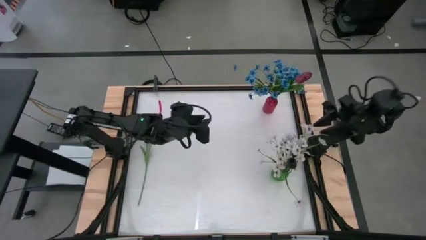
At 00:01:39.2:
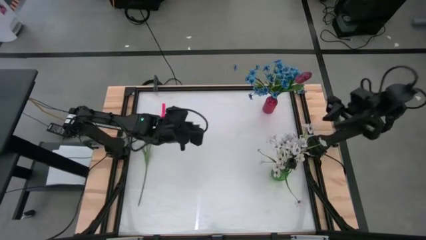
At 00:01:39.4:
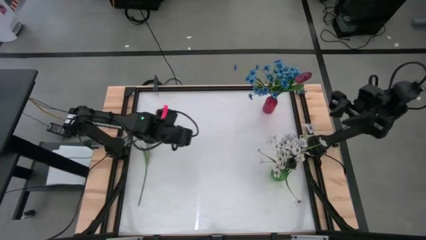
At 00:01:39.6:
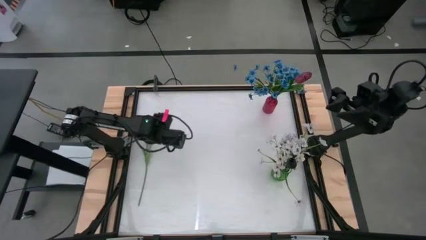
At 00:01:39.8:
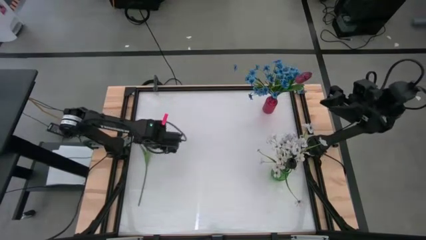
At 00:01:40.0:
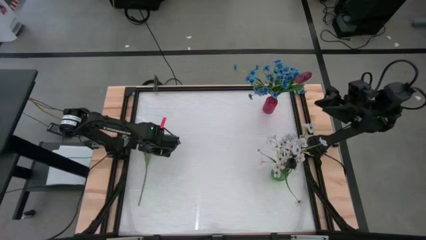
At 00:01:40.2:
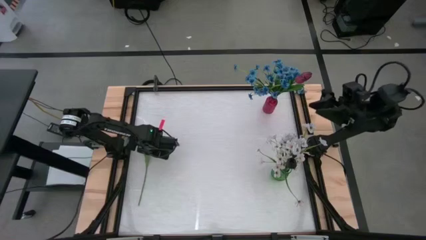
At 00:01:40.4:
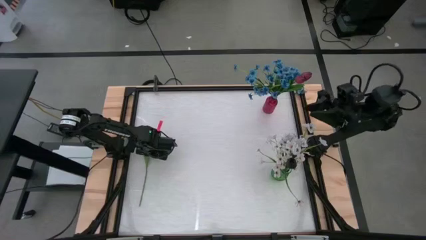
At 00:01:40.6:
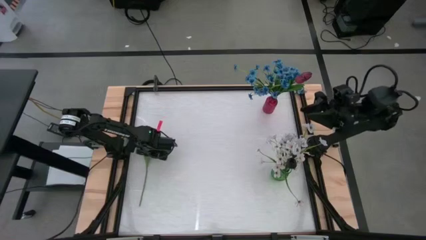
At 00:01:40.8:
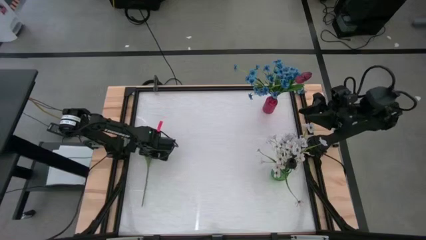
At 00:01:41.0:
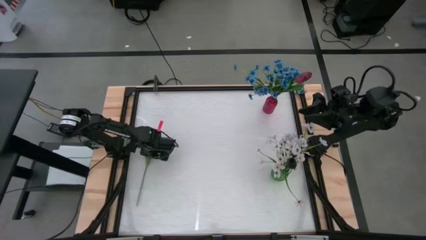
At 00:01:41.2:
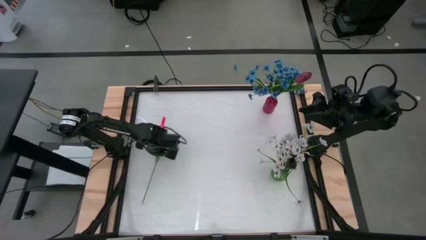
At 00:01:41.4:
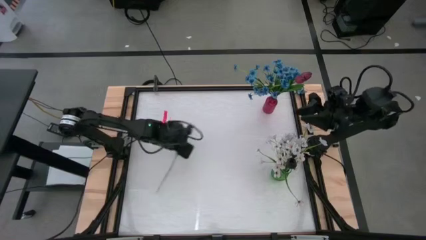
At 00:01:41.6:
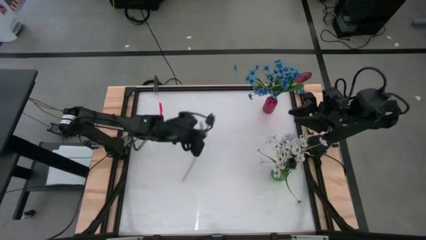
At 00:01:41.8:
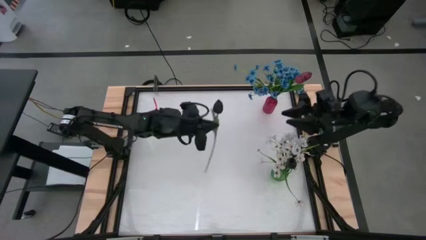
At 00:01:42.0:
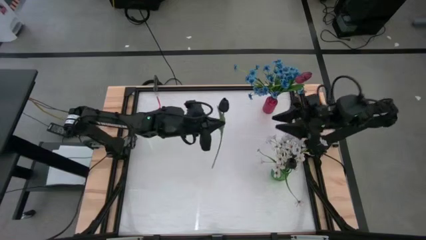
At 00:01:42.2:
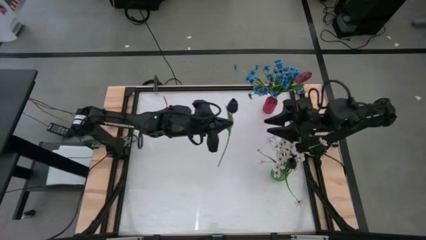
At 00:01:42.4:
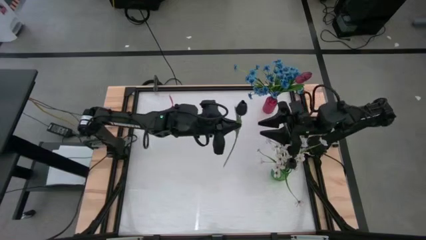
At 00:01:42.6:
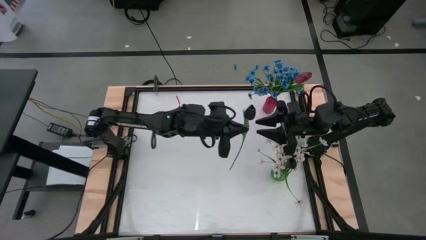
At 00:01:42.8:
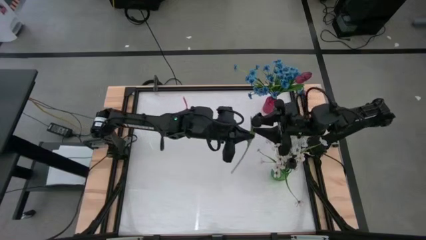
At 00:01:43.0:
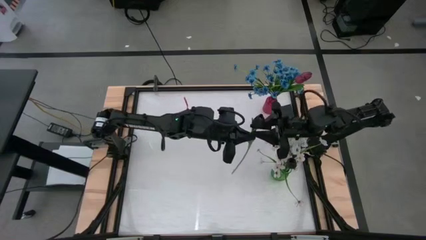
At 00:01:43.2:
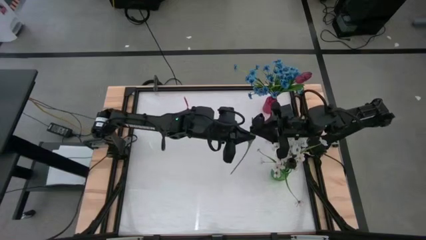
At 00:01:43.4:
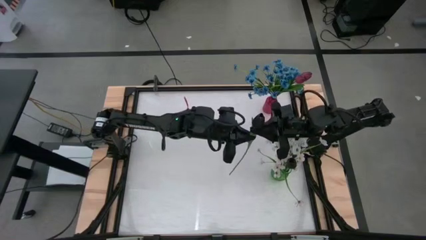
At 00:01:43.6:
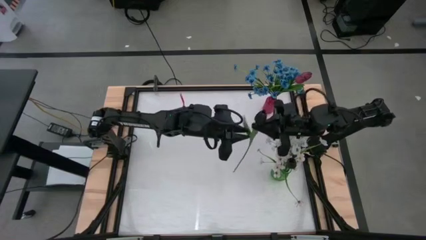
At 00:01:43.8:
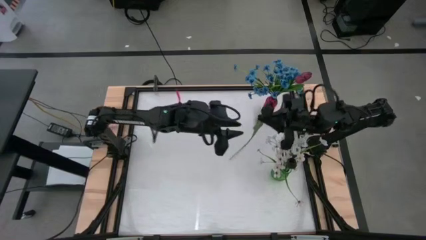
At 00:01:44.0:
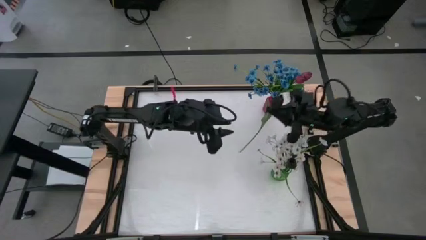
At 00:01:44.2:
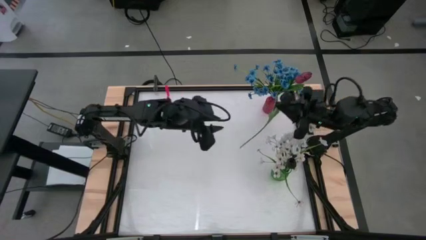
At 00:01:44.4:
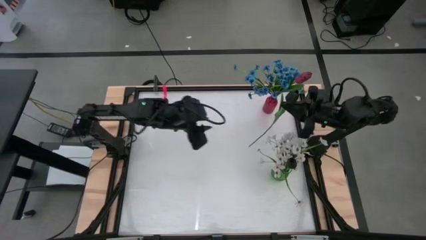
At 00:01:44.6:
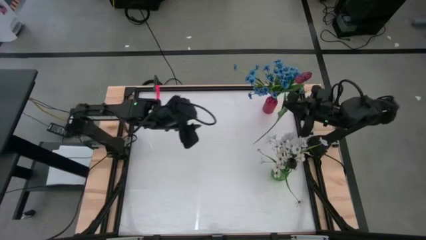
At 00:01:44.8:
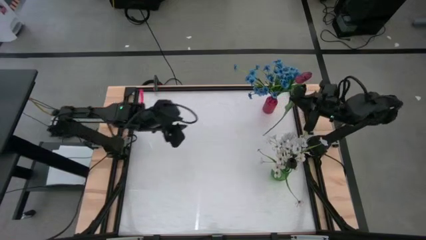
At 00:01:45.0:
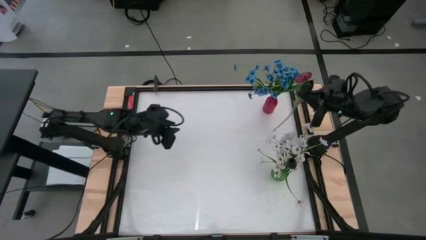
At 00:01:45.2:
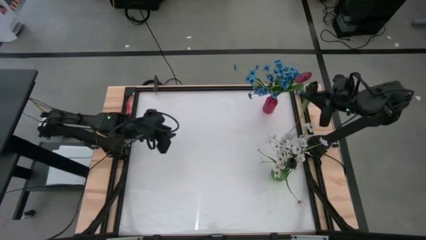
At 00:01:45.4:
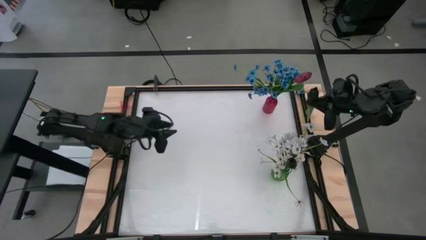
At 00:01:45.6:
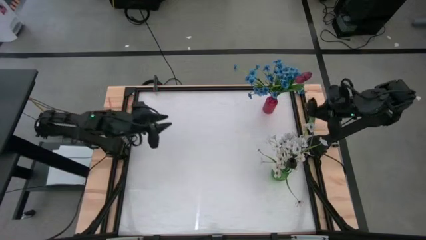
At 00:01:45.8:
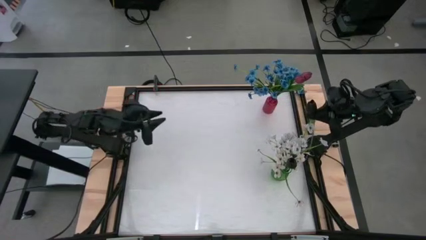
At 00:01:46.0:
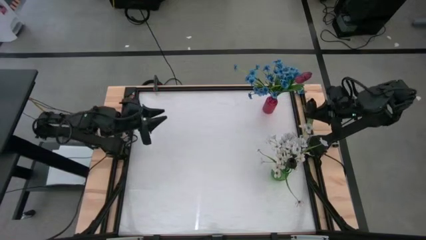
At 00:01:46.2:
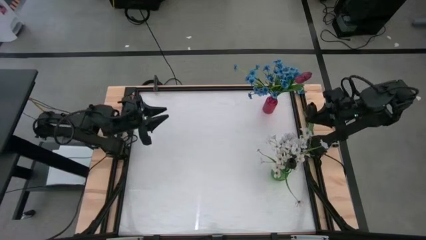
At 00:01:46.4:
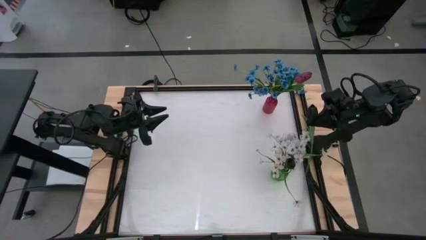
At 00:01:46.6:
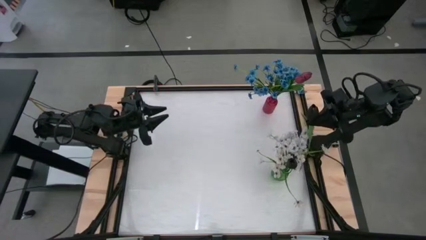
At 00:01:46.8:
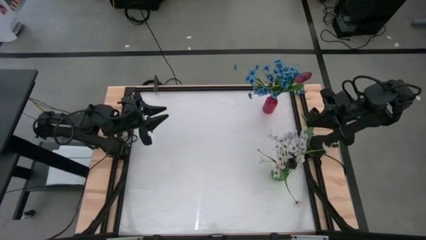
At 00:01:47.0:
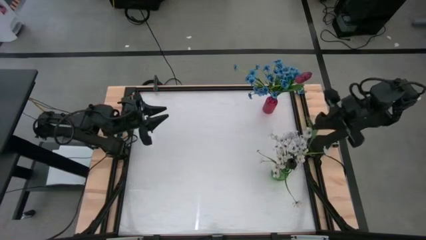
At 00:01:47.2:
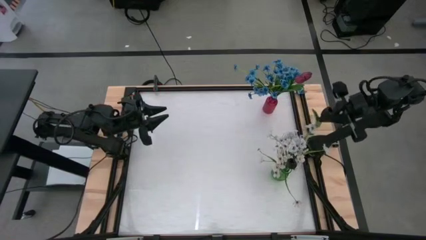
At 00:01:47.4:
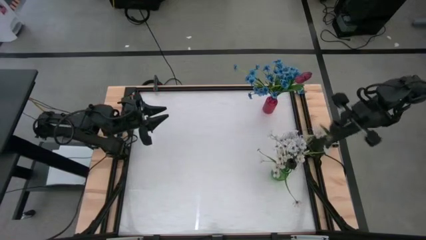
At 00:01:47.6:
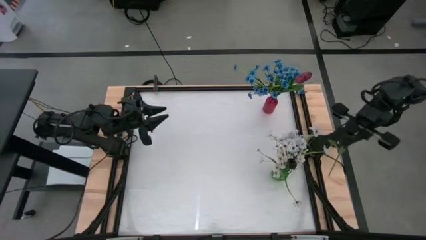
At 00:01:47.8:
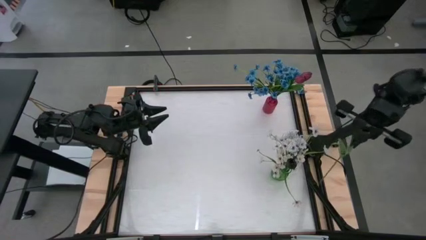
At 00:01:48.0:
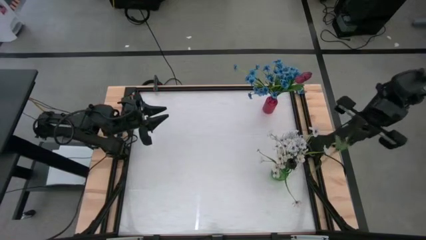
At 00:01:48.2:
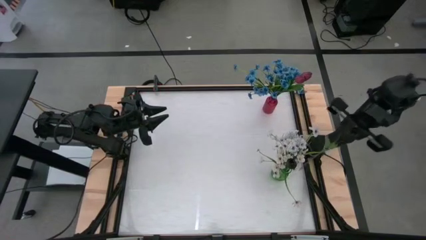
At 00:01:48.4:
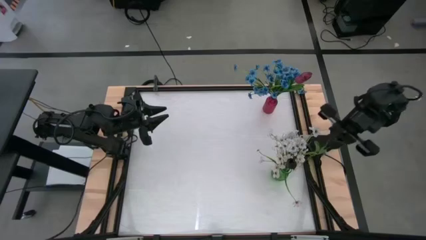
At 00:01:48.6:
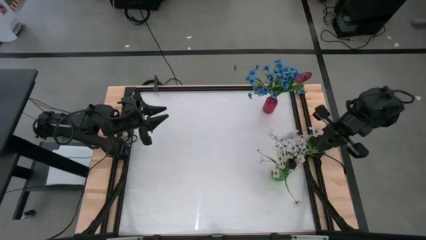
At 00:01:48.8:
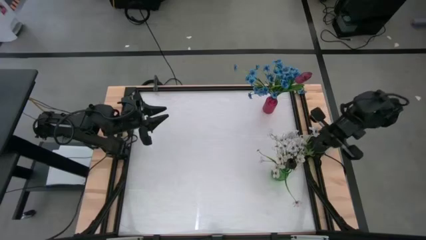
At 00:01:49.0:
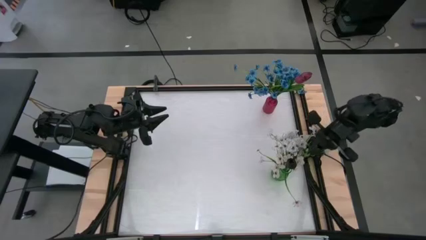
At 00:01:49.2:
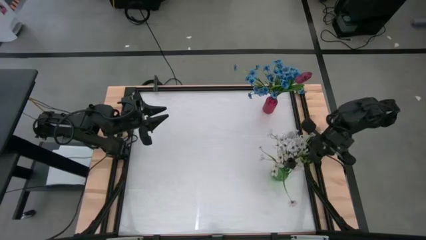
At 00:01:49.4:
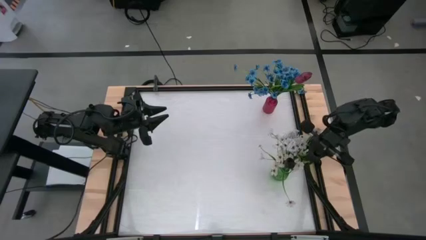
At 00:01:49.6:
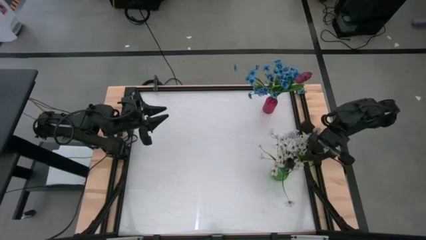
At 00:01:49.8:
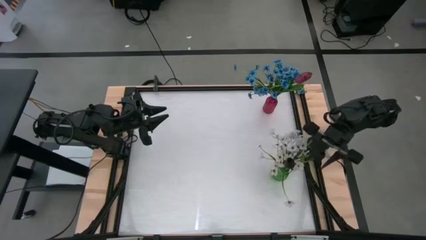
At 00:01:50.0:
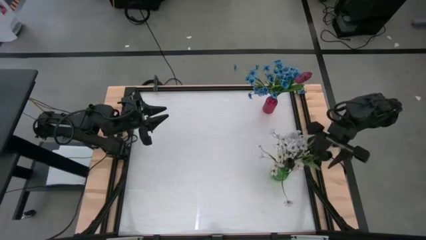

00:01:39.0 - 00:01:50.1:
Task: Sort flowers into vase by color
Put the black flower into the green vase

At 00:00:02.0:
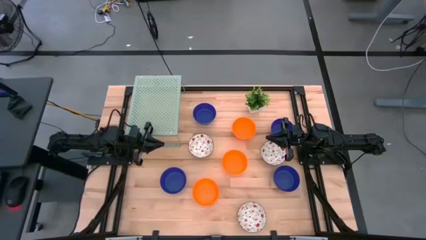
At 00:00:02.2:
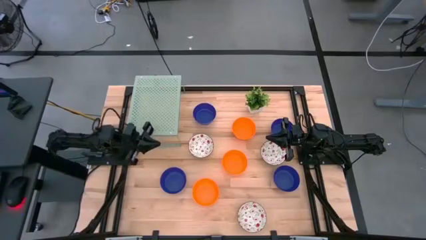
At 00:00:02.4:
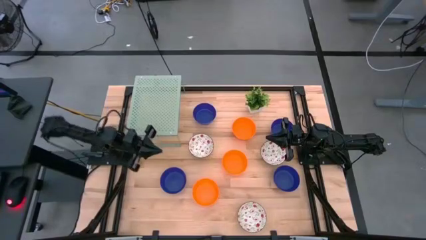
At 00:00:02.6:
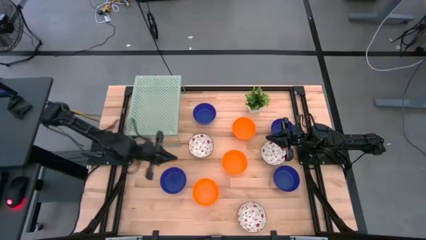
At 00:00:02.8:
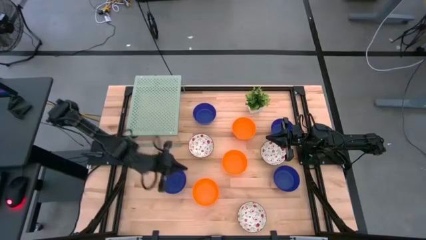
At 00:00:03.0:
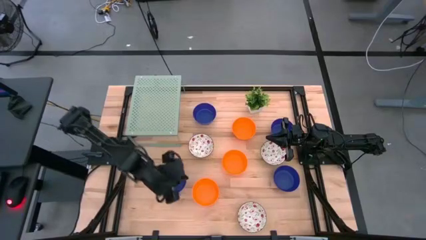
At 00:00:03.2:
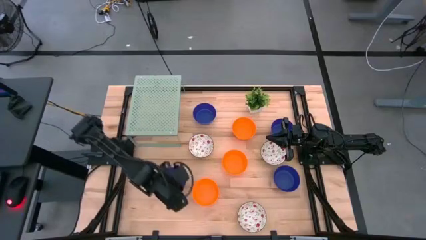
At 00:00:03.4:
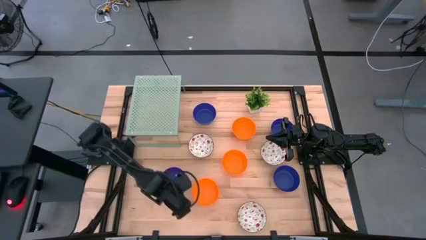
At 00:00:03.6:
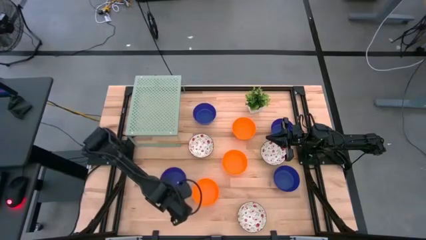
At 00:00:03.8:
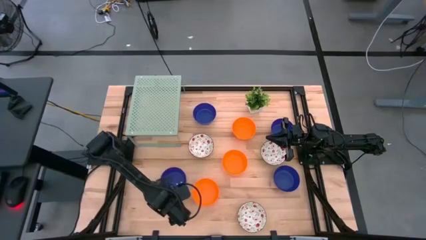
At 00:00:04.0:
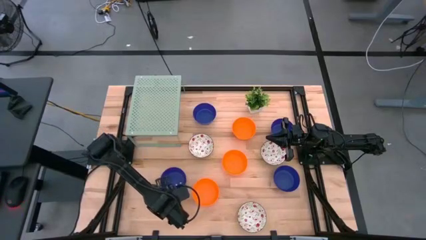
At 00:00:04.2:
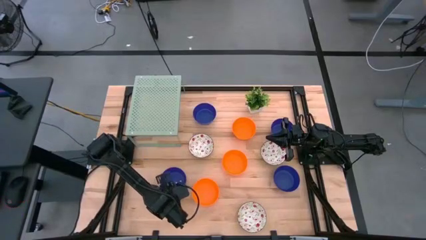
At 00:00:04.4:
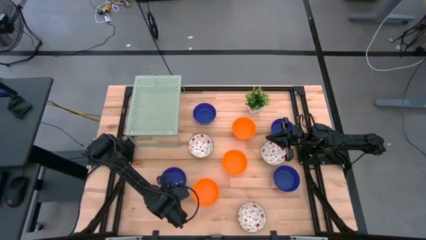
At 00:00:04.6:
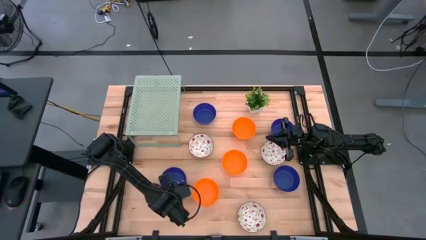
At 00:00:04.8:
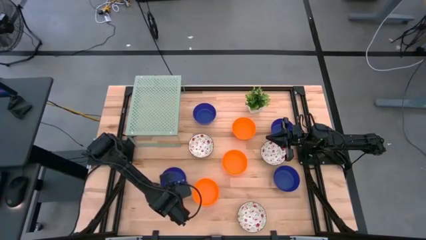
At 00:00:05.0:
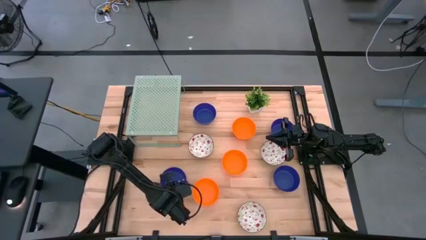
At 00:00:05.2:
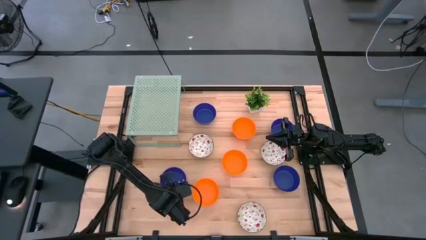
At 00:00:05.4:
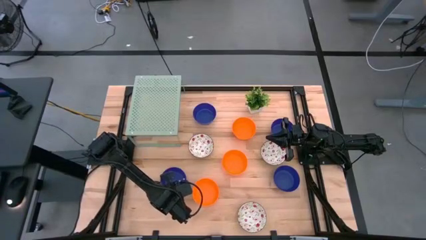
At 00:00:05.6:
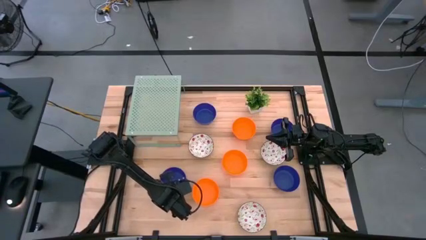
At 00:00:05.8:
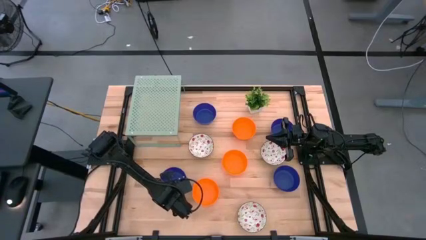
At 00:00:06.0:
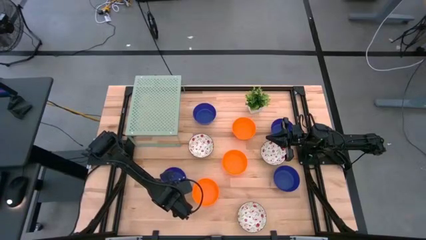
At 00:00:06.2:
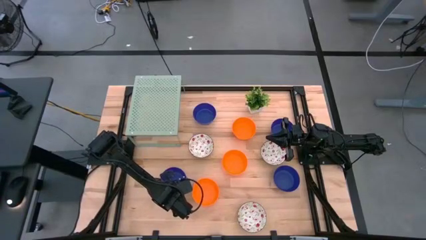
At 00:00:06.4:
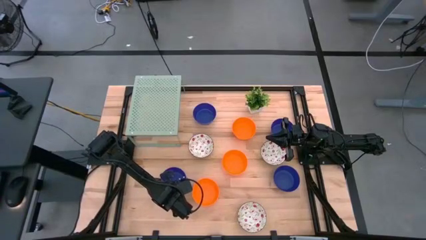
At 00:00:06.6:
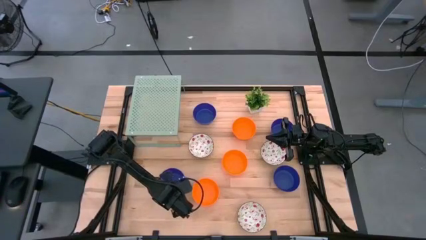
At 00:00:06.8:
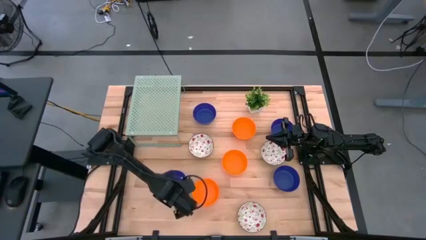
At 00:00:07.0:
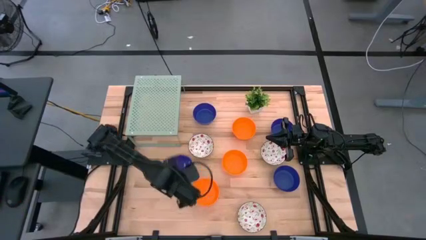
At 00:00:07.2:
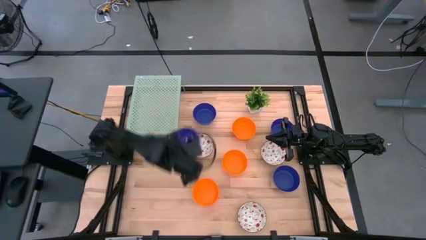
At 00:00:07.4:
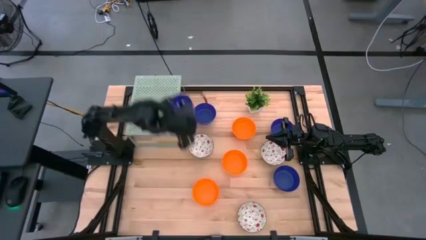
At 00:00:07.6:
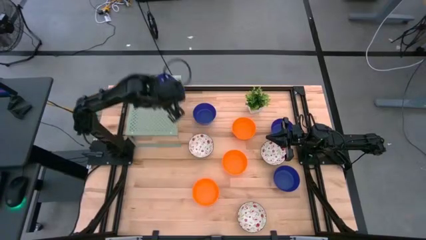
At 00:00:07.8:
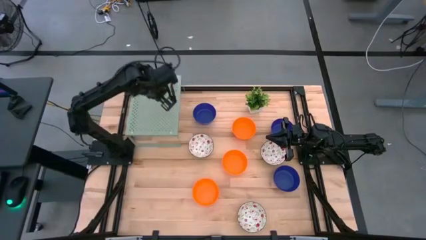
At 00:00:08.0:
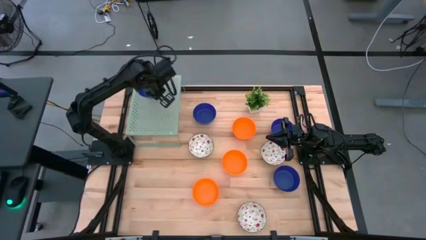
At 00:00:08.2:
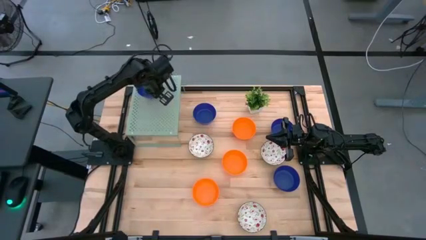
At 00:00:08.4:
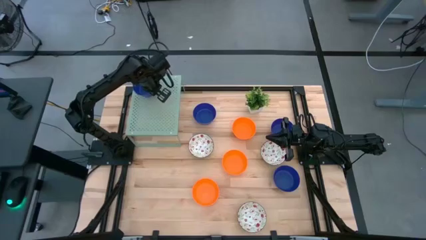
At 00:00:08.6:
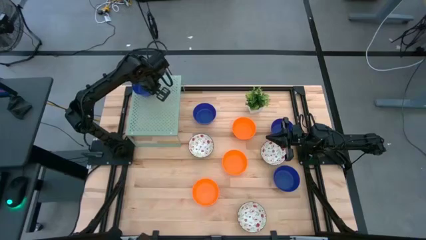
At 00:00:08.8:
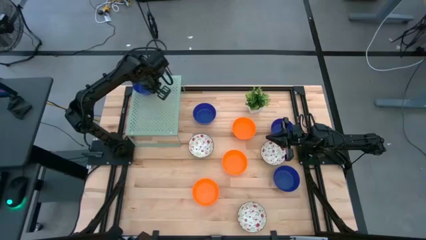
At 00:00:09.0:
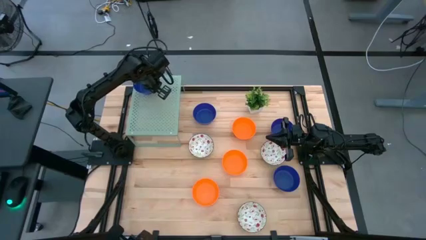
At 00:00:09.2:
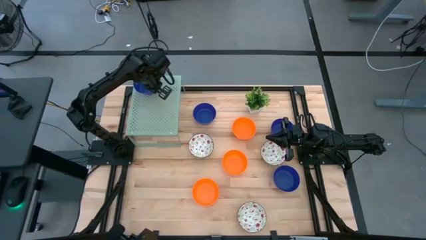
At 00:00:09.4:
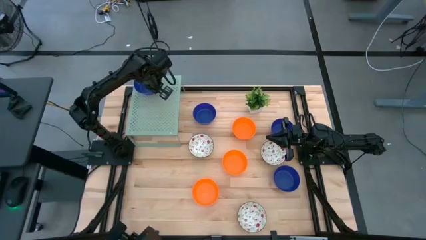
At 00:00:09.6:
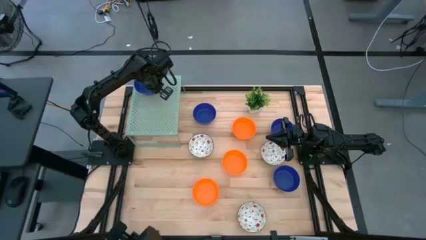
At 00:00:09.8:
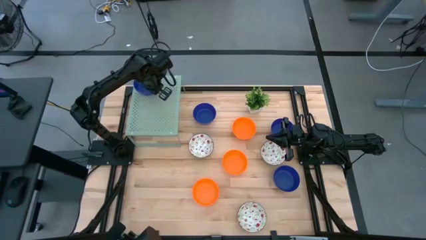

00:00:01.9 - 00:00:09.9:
Task: Pick & Place Mini bowls
Put the blue bowl on the shelf
